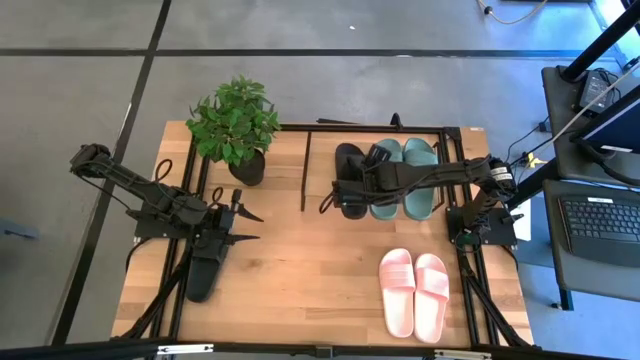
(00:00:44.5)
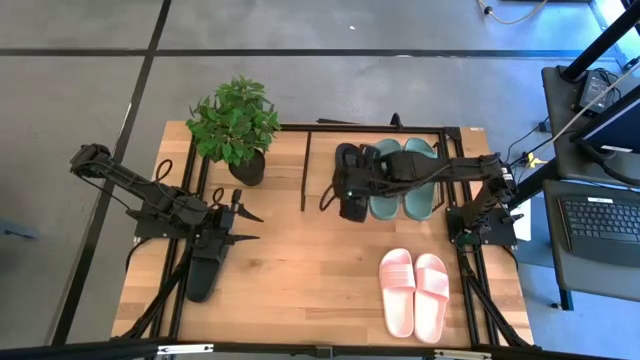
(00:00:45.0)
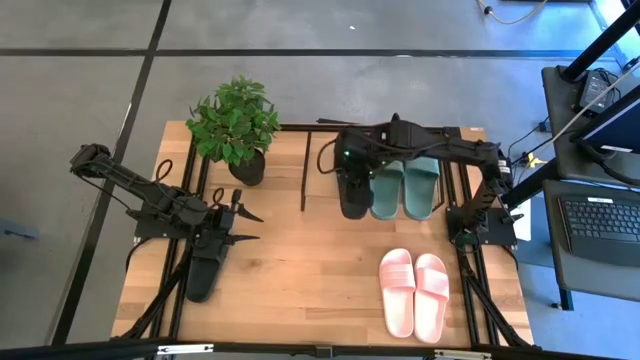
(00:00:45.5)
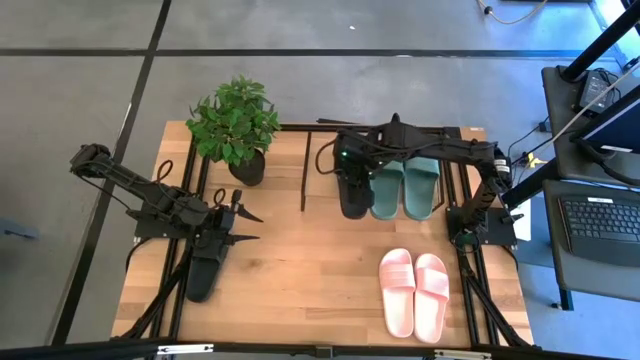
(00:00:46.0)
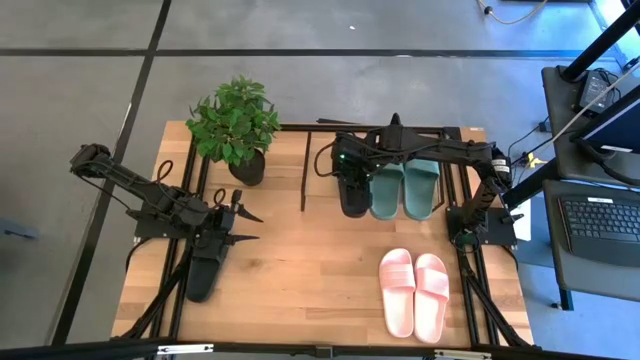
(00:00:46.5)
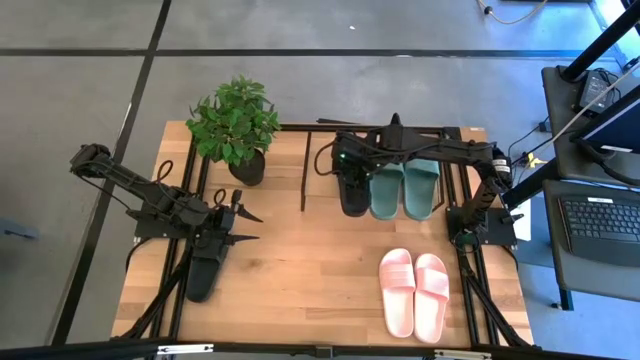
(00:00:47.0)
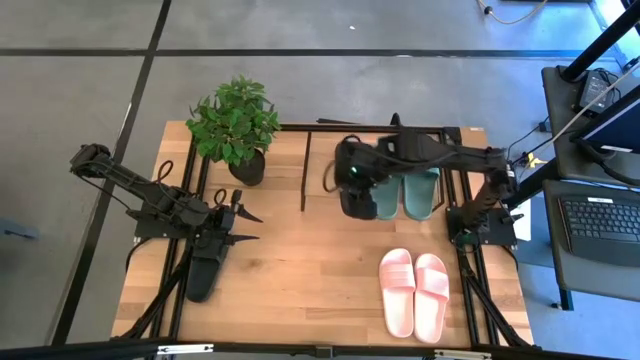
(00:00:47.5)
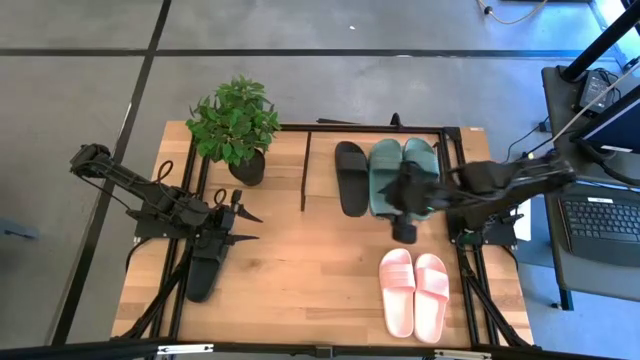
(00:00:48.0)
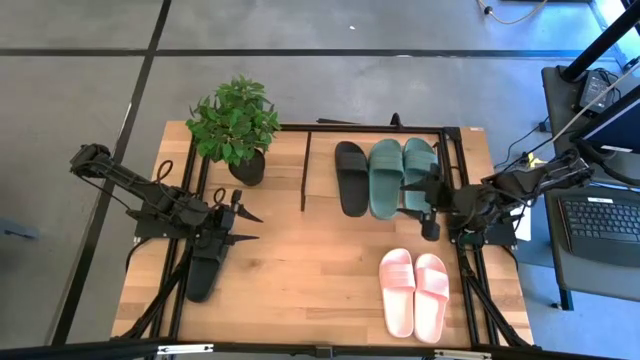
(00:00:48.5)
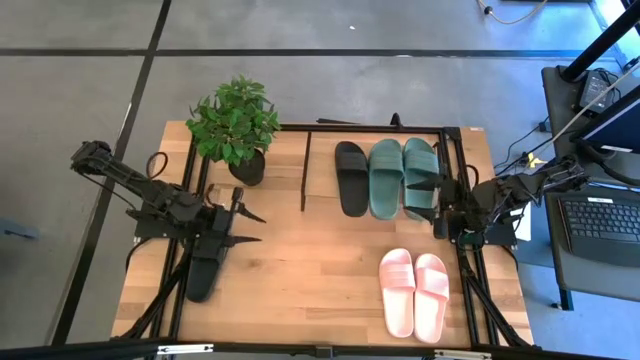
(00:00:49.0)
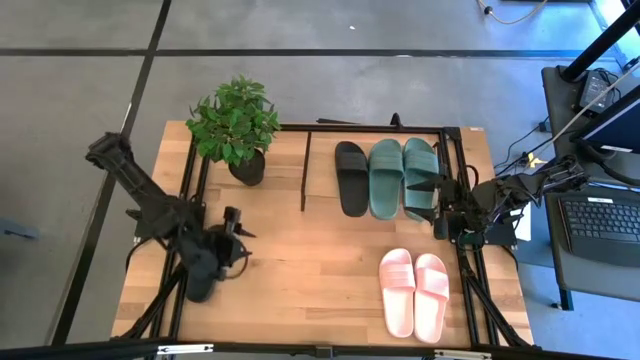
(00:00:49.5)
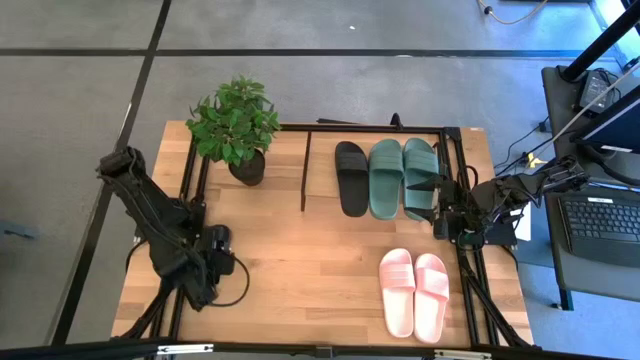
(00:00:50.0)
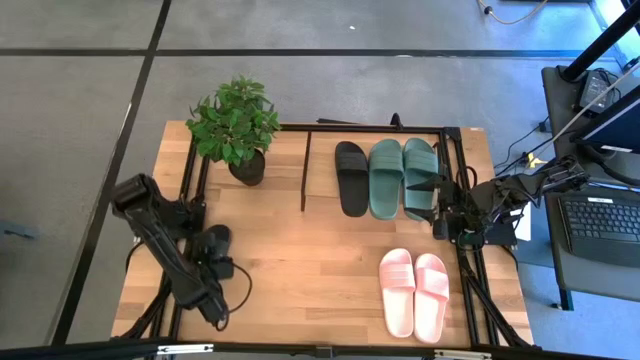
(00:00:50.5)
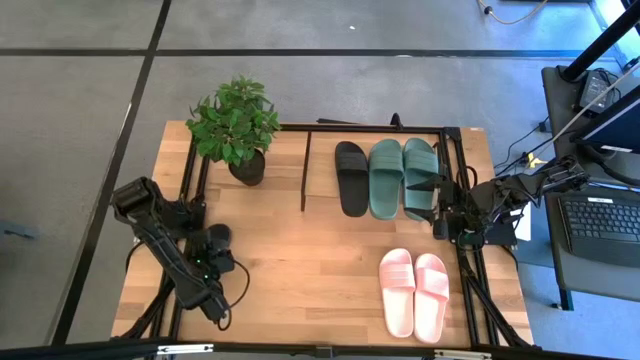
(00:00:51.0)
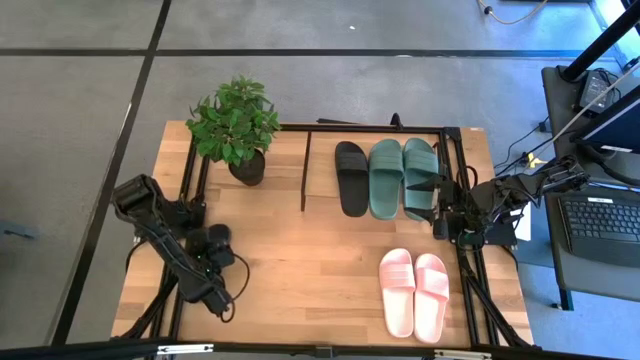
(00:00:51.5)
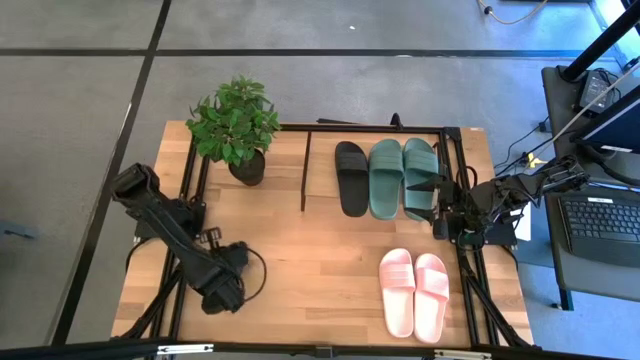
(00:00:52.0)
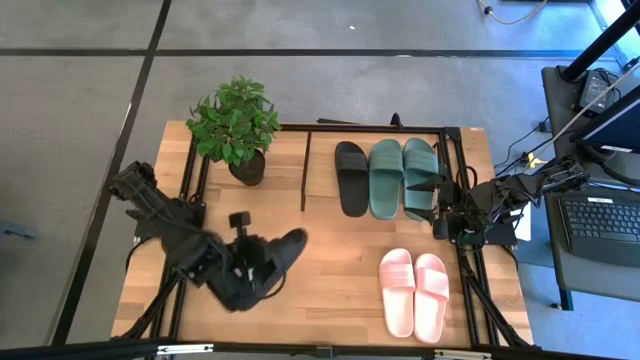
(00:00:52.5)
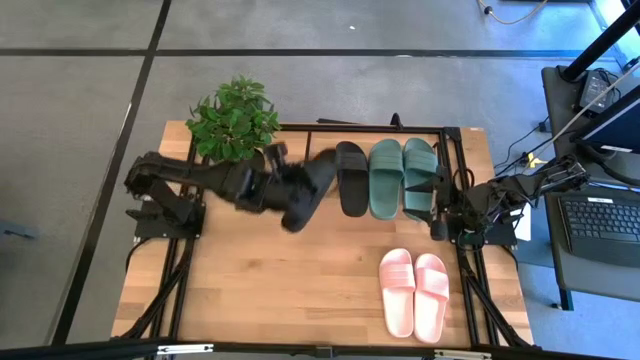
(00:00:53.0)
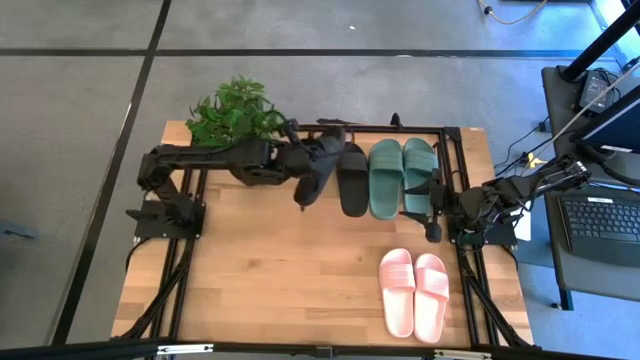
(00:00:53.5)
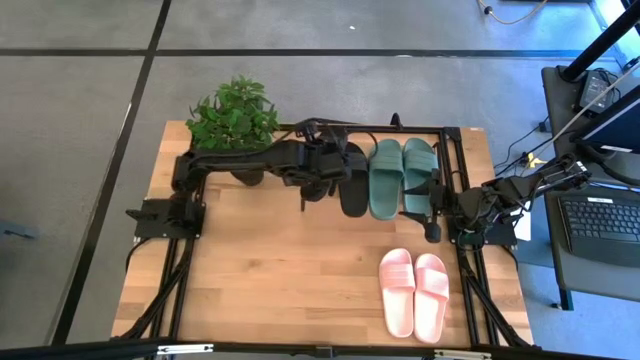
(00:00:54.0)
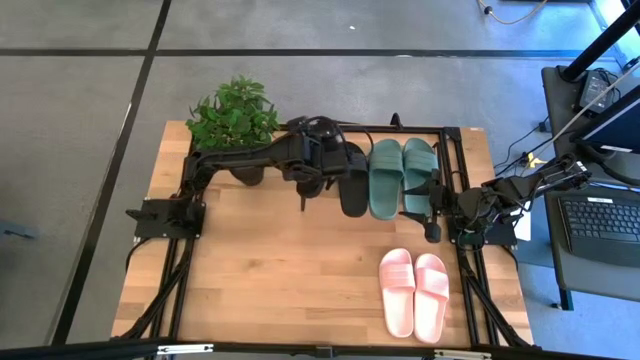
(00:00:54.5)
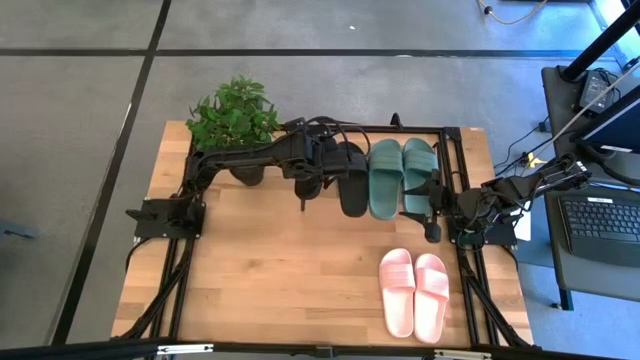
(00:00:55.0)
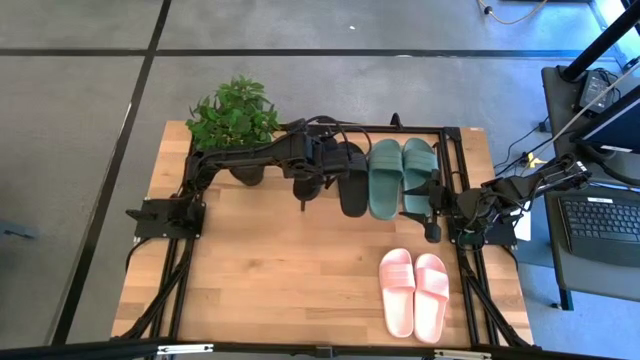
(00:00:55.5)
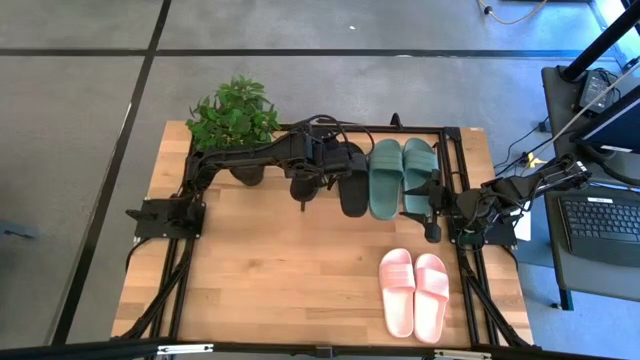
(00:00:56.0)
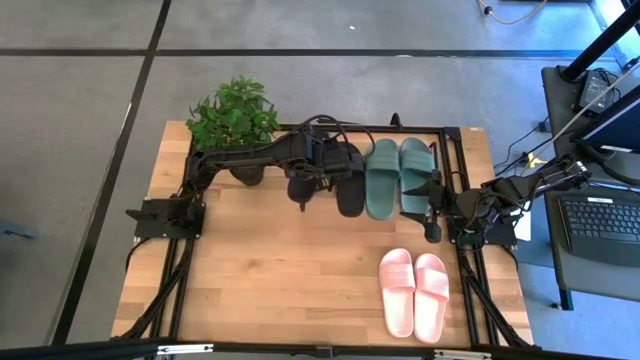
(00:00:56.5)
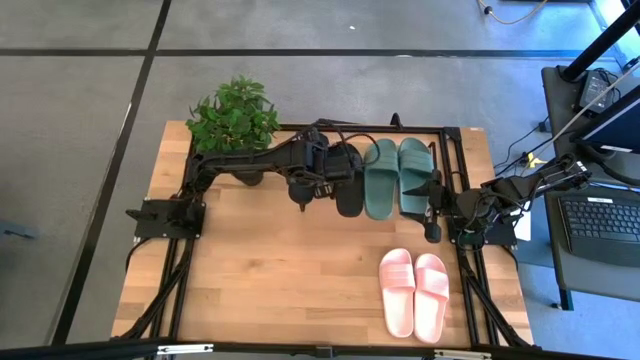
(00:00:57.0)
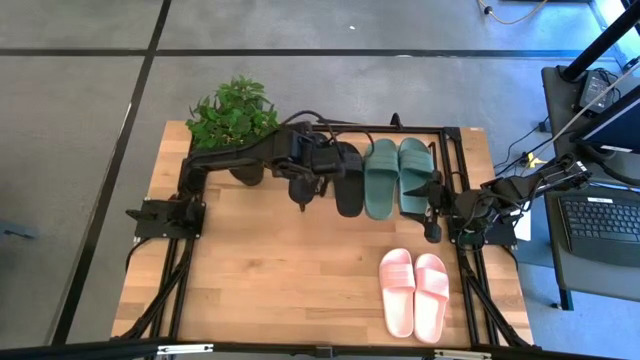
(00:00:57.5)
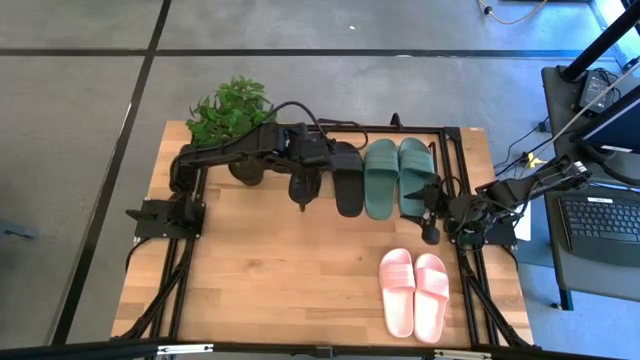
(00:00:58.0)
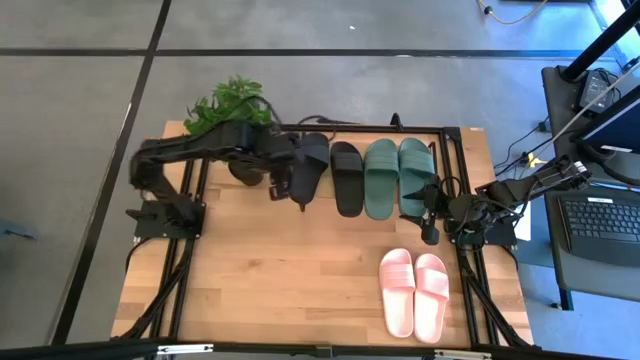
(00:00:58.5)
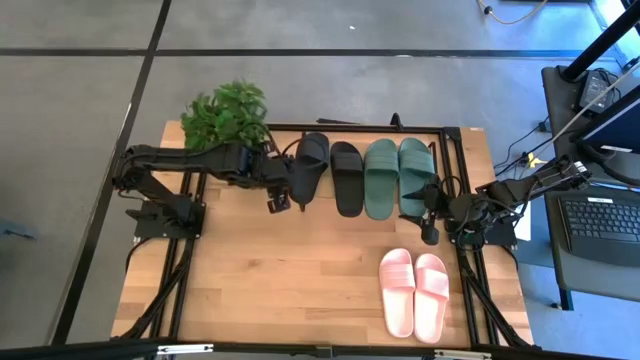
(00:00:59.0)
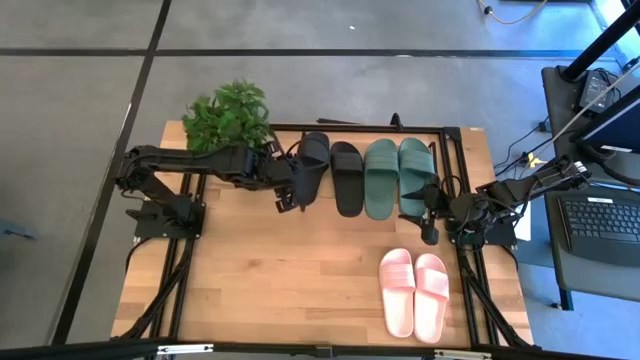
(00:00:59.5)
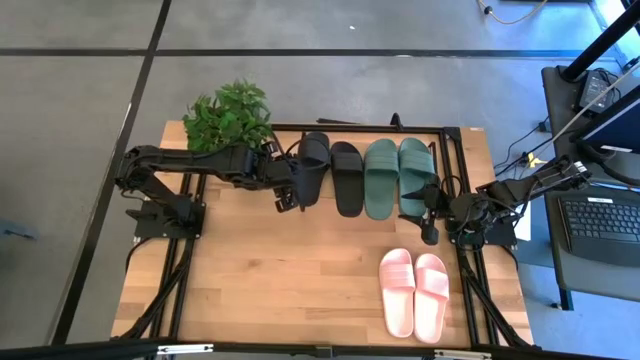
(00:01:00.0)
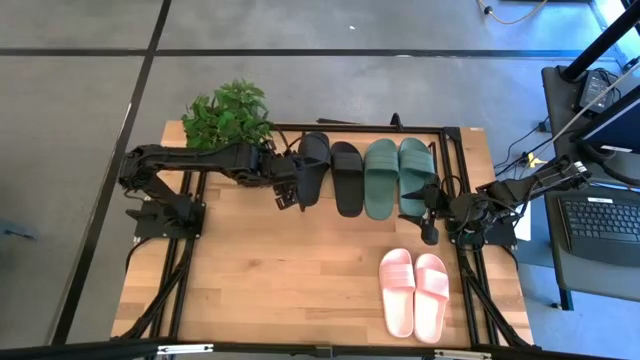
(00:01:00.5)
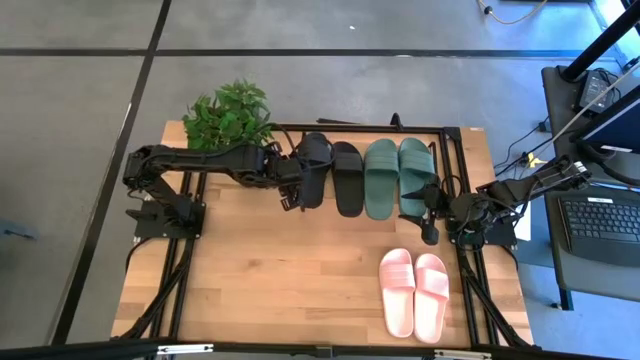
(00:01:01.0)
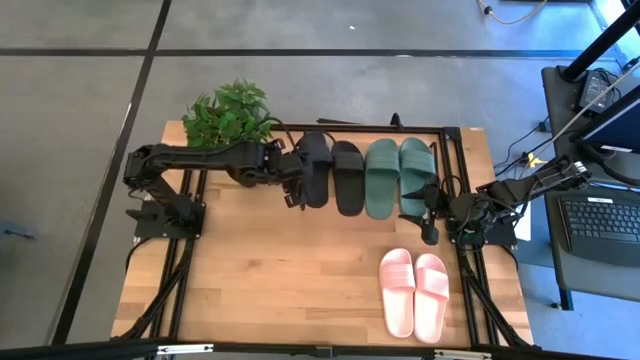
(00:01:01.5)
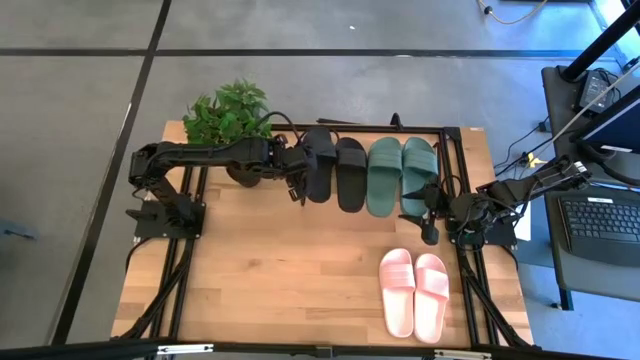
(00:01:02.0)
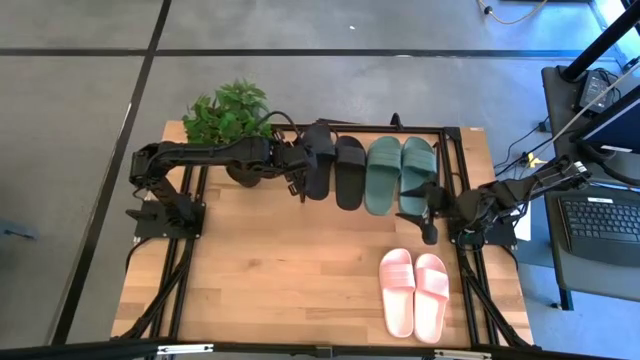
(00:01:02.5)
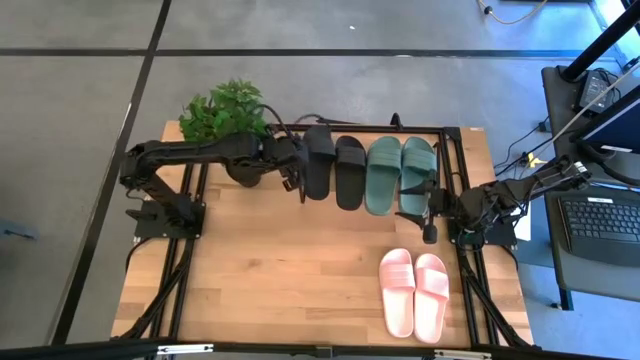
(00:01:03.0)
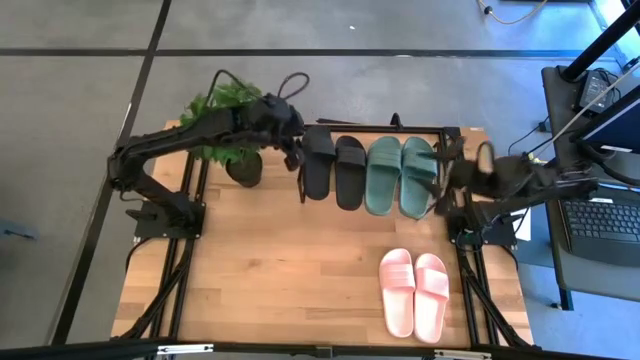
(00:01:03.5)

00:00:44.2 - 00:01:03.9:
Task: Pick and place slides into the shelf
Put the black slides on the shelf
